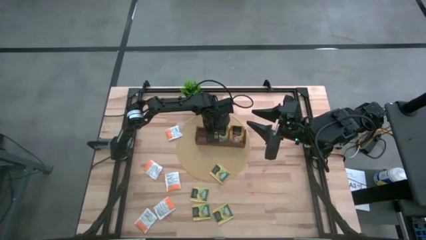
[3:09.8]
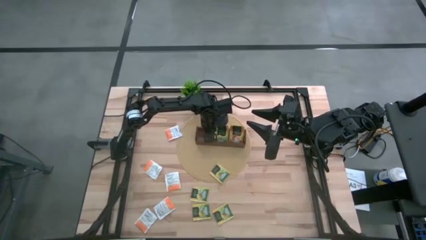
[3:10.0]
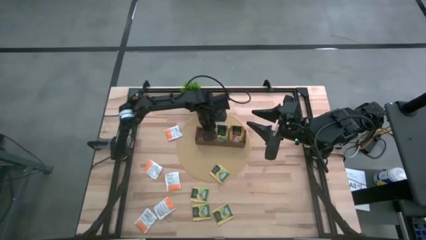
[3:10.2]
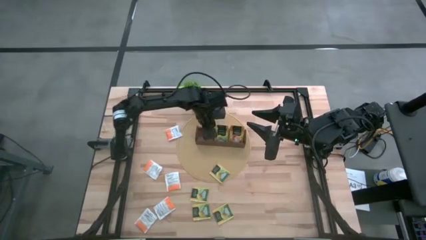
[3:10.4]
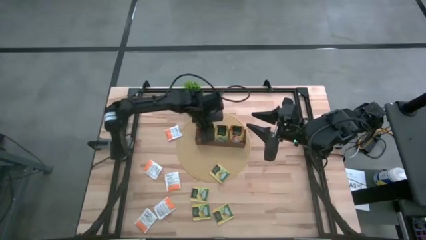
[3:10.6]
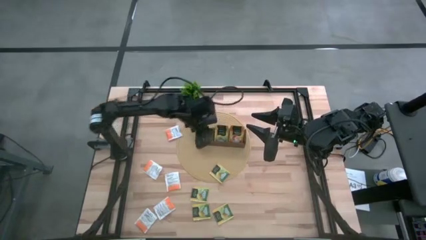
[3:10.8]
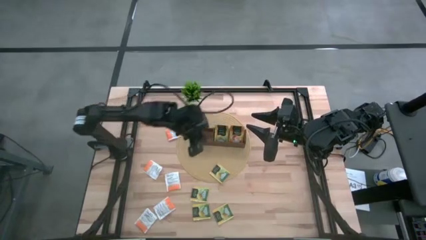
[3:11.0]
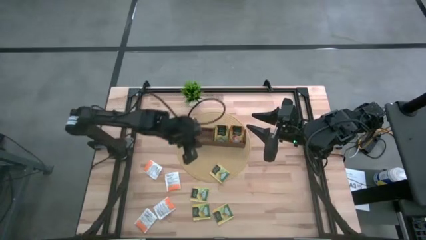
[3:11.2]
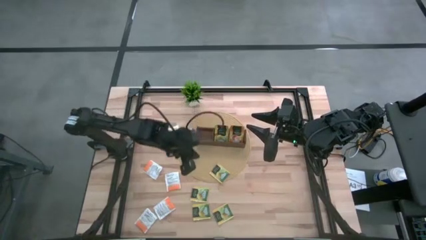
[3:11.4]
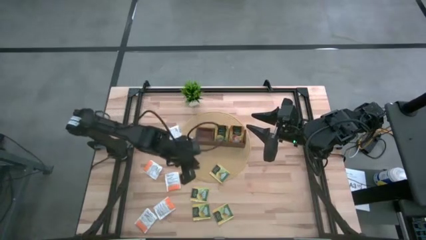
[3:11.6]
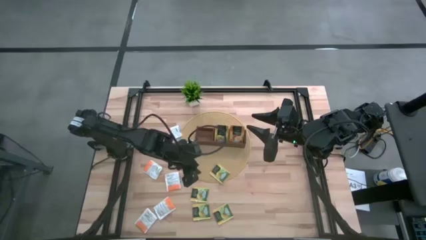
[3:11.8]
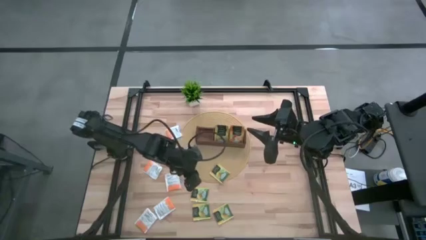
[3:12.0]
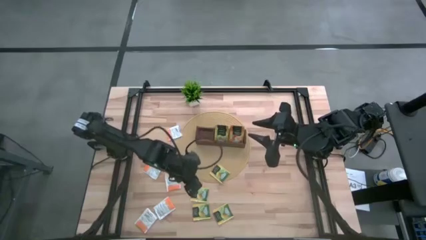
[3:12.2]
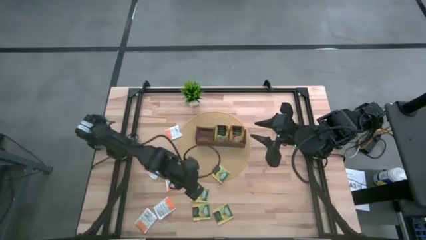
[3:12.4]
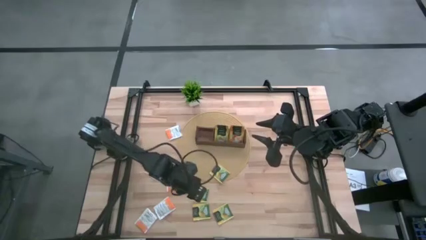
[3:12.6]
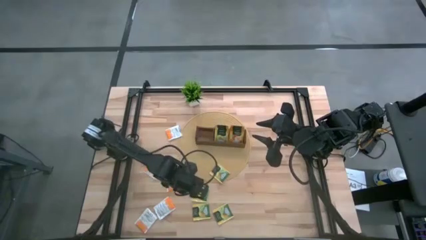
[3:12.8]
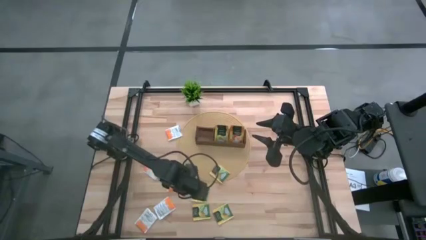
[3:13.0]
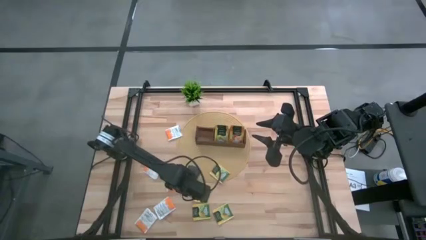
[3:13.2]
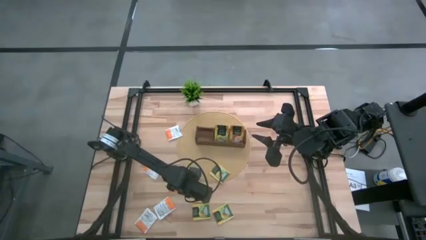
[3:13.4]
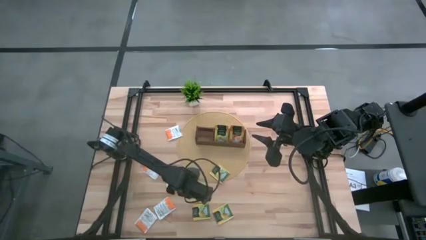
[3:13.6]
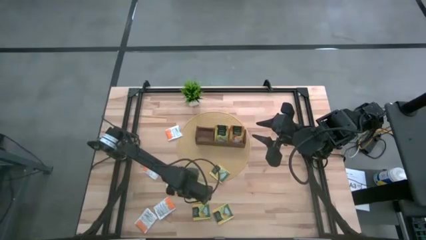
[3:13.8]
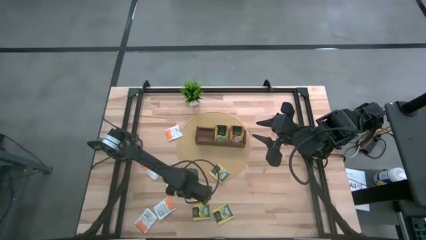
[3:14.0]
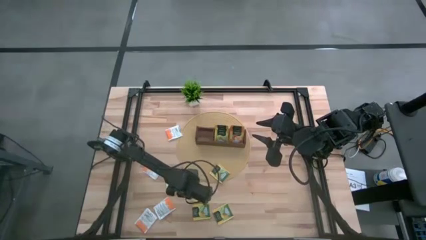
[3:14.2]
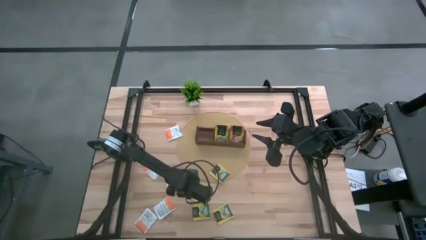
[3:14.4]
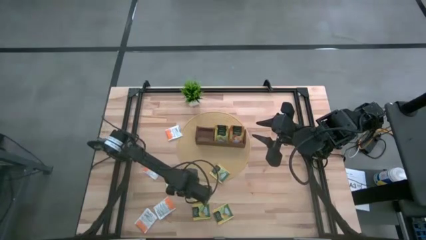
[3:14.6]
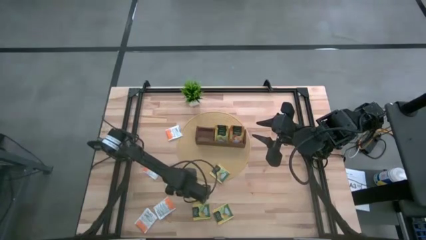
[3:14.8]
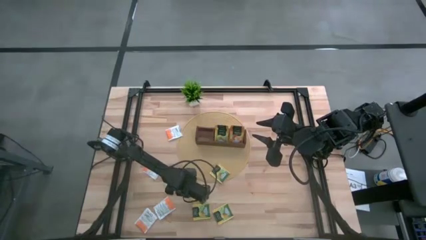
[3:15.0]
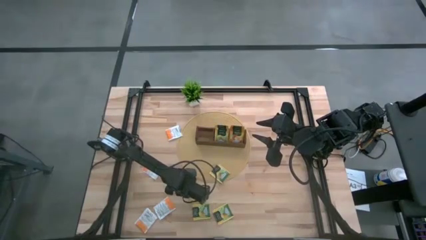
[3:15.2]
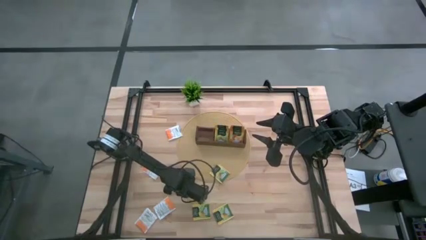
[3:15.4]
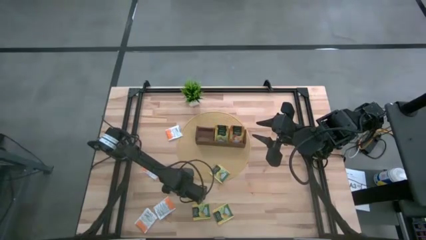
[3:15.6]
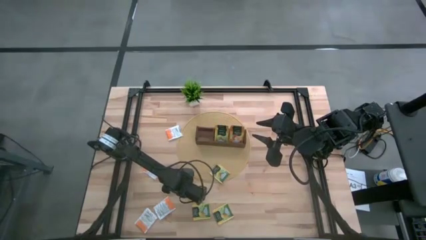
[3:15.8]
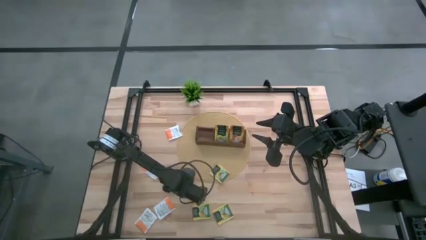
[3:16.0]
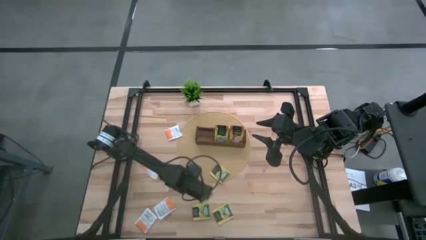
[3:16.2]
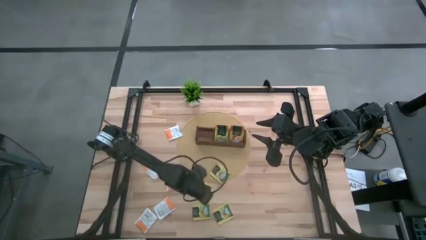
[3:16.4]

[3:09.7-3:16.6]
Task: Pick & Place Tea
Put the yellow tea bag into the middle section of the wooden organizer

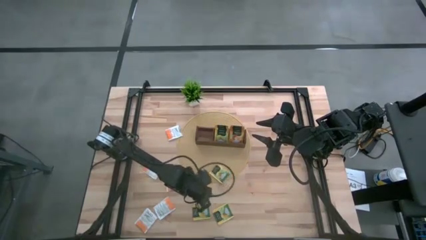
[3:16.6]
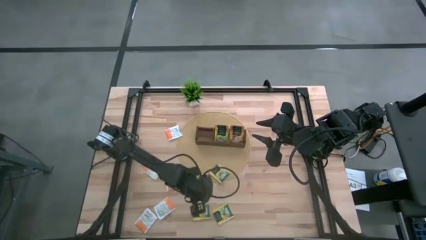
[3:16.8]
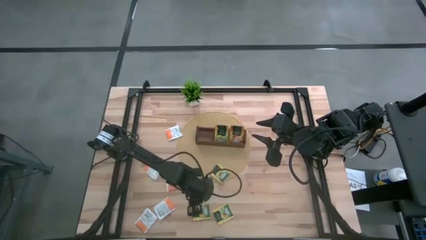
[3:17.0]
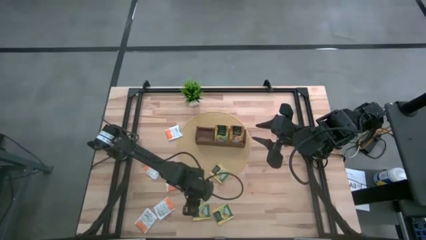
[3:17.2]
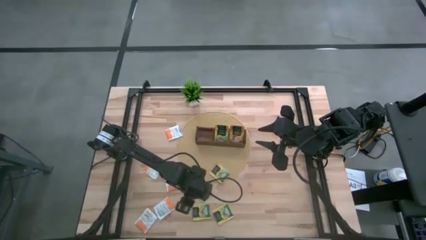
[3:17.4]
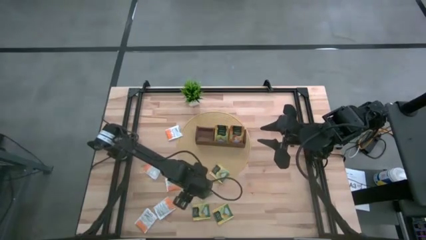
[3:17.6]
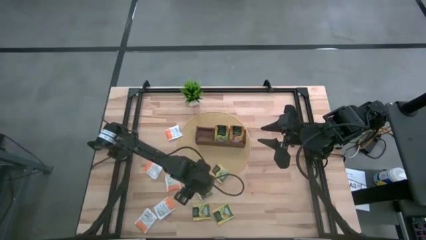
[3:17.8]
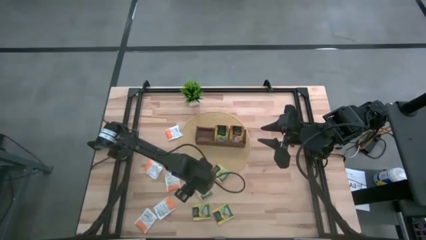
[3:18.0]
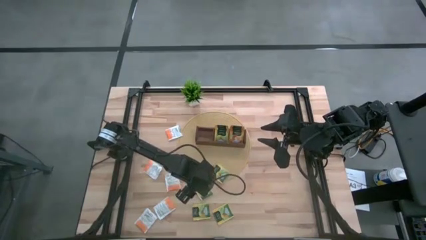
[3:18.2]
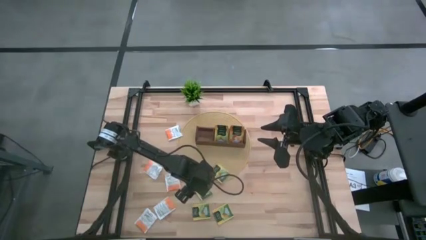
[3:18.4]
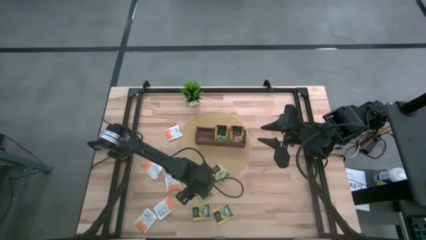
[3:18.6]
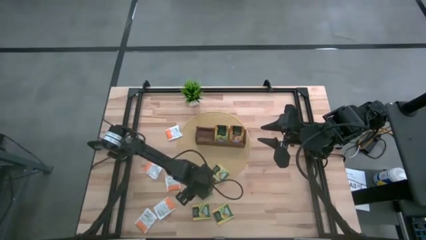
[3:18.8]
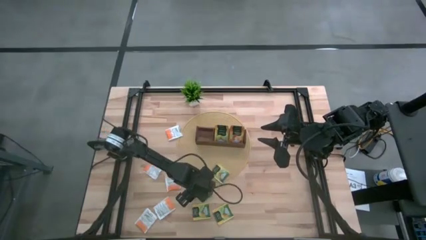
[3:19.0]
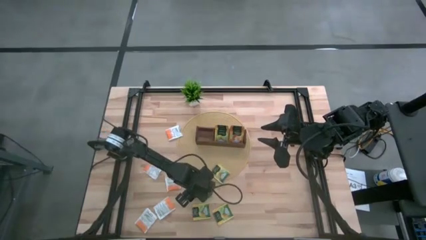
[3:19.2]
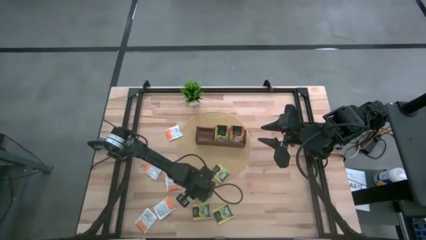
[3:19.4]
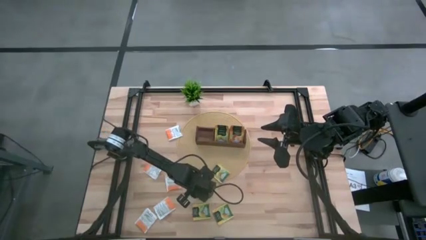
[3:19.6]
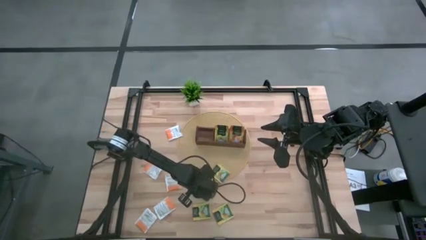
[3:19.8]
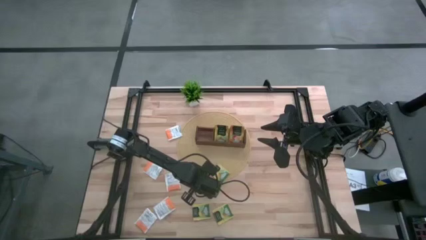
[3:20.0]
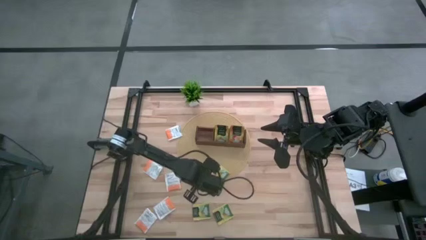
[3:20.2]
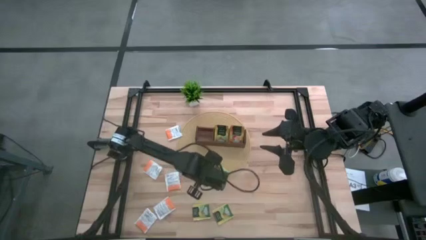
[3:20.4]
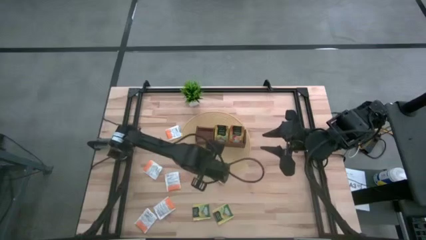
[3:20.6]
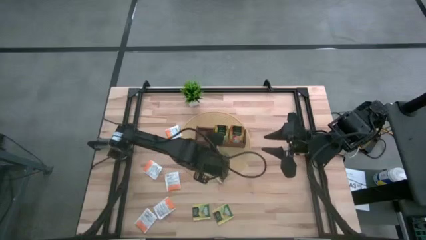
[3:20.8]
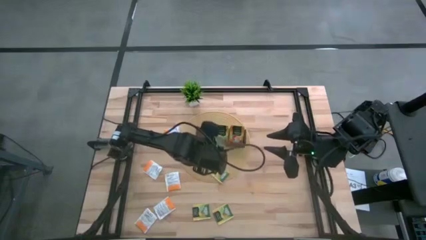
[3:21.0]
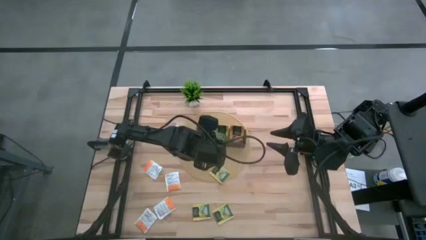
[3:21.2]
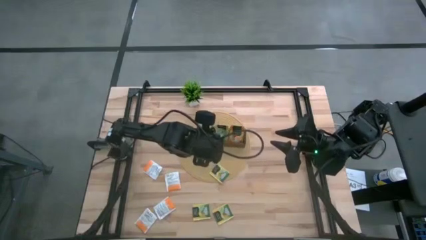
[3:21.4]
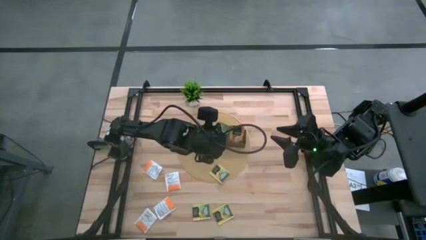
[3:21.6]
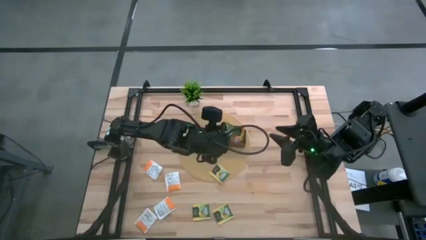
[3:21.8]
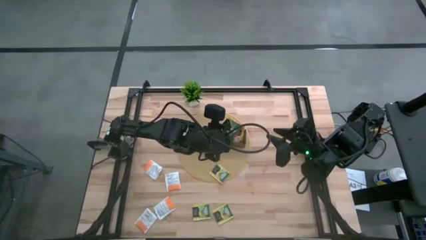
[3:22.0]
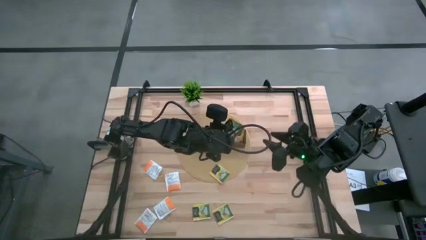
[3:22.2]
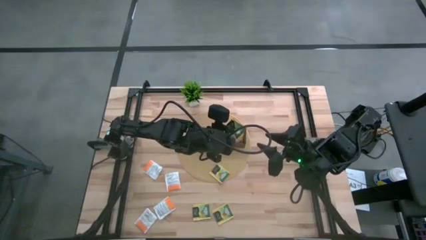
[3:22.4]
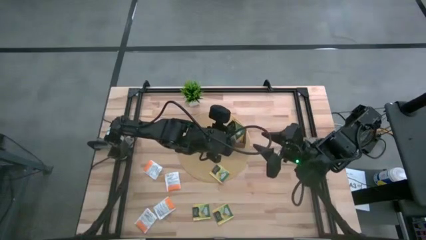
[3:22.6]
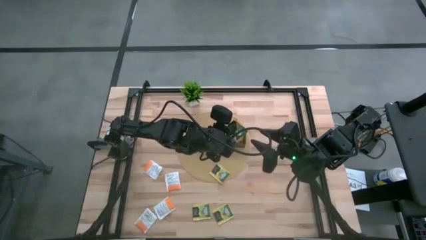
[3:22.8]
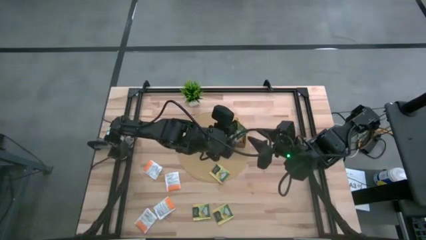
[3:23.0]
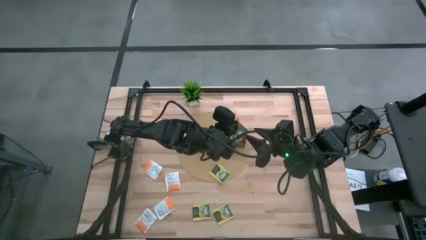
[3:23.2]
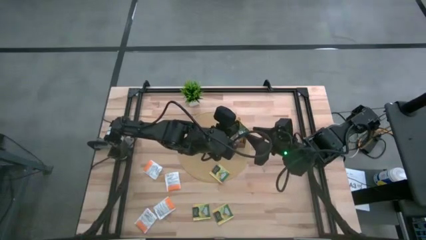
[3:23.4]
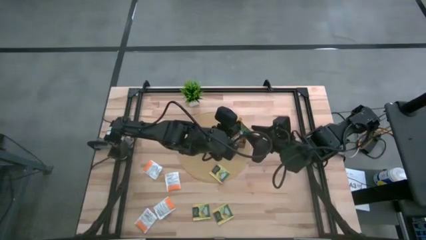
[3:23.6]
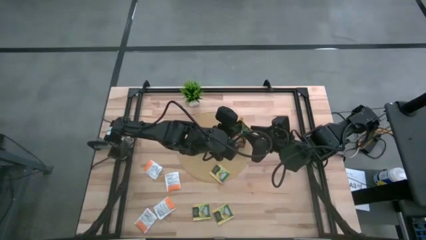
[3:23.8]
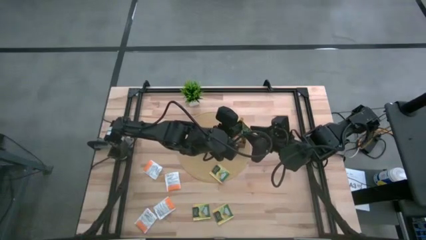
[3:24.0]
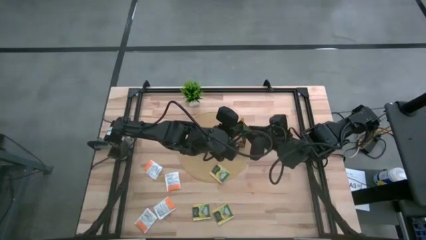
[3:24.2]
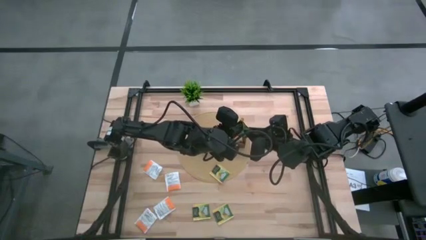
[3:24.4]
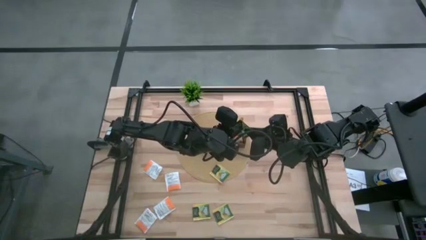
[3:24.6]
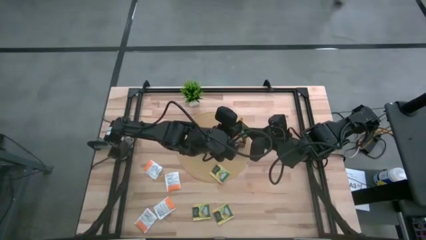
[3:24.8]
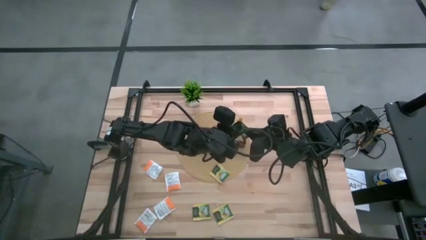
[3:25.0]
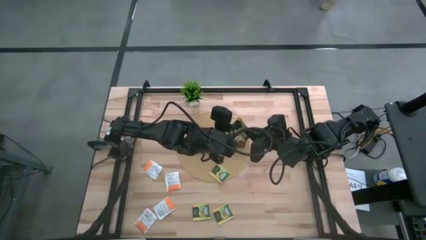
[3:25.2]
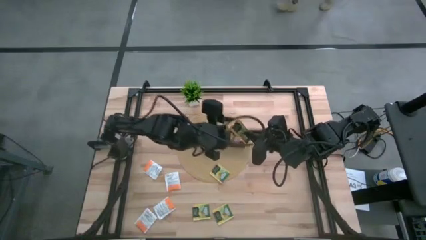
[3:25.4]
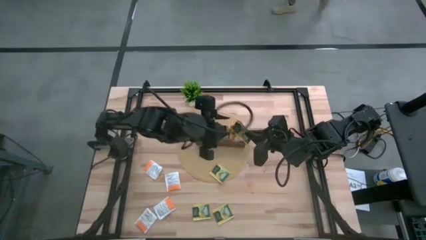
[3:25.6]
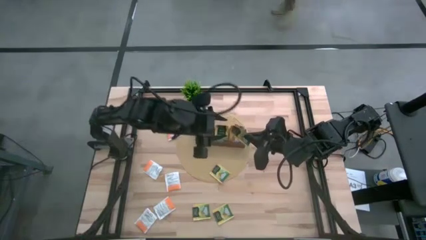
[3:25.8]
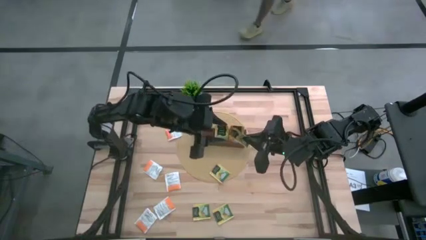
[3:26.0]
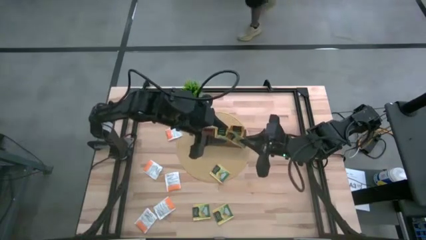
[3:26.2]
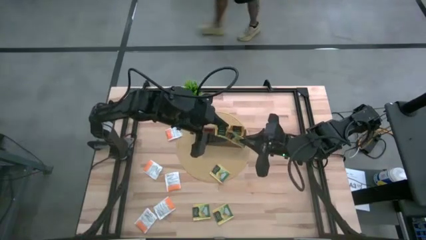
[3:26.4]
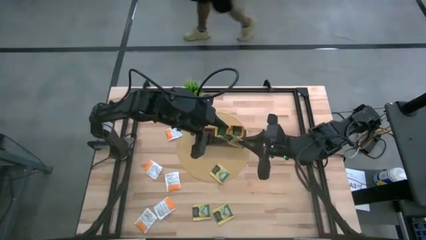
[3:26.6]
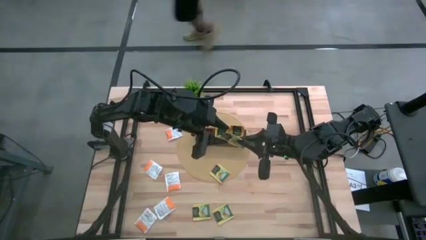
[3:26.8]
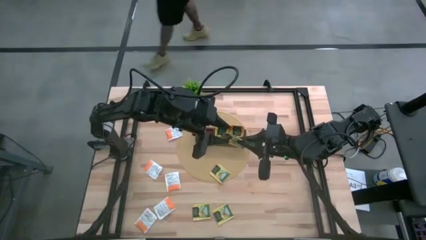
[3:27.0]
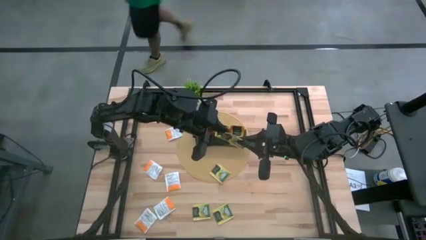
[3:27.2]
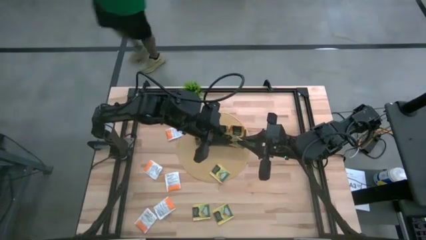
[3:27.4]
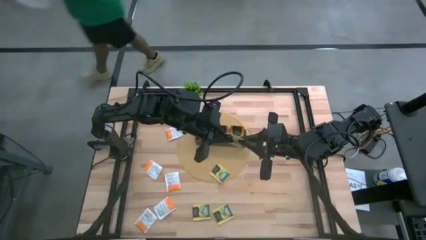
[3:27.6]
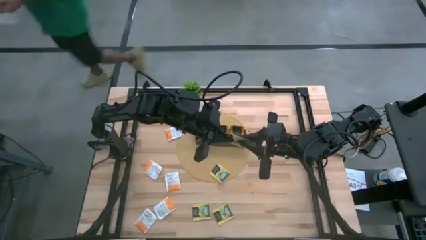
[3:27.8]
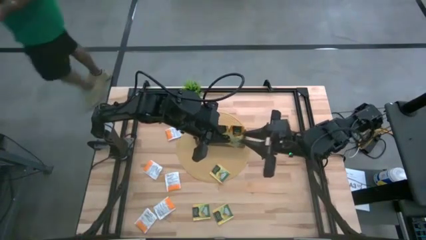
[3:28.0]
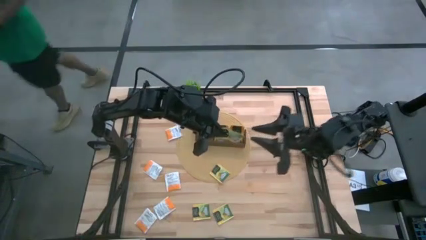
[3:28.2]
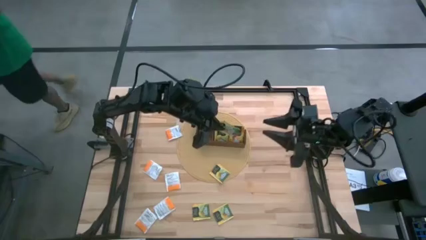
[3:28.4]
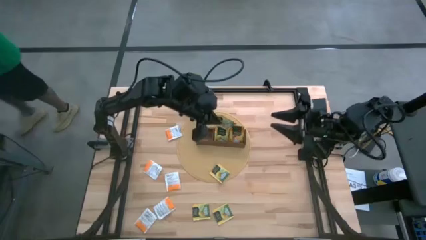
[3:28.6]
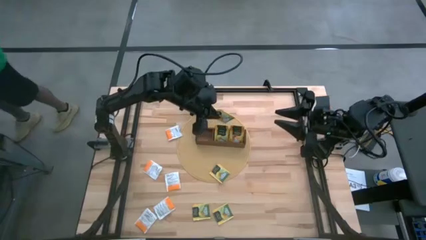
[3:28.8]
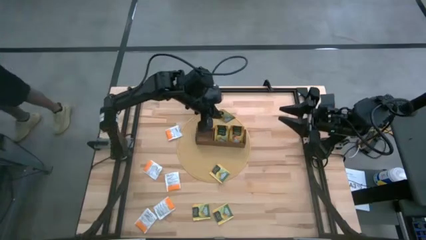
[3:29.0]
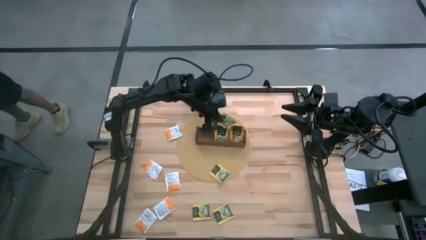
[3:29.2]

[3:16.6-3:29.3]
Put the yellow tea bag into the middle section of the wooden organizer
